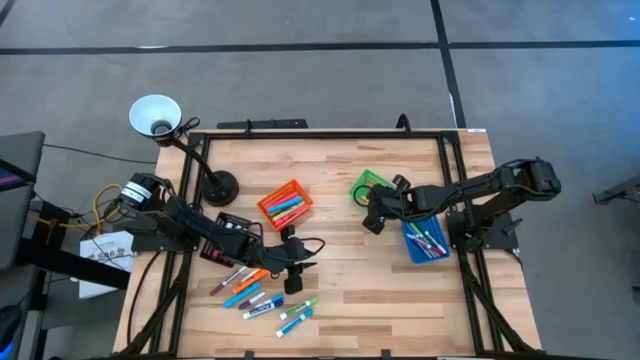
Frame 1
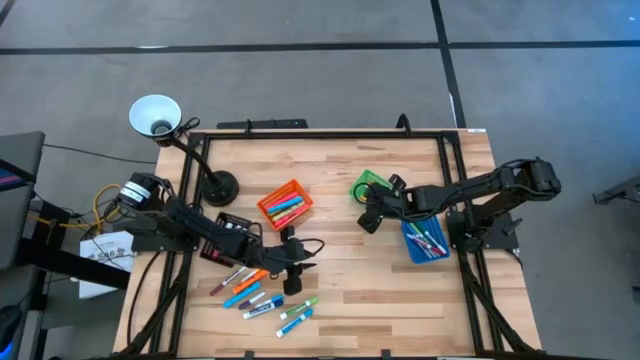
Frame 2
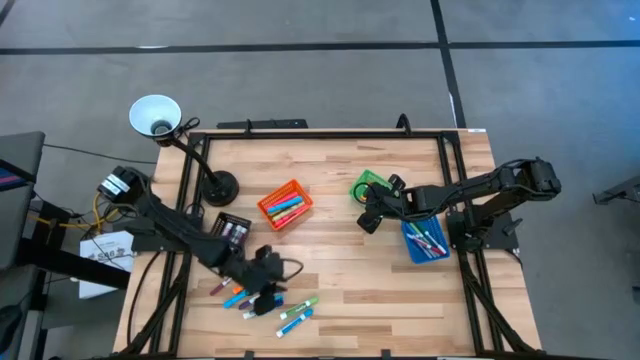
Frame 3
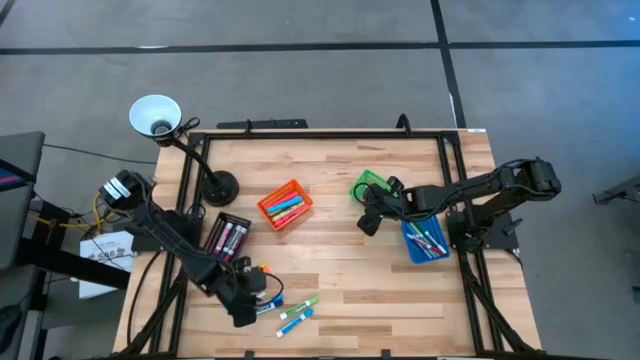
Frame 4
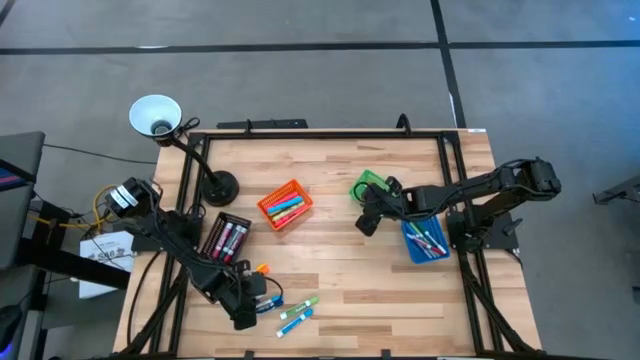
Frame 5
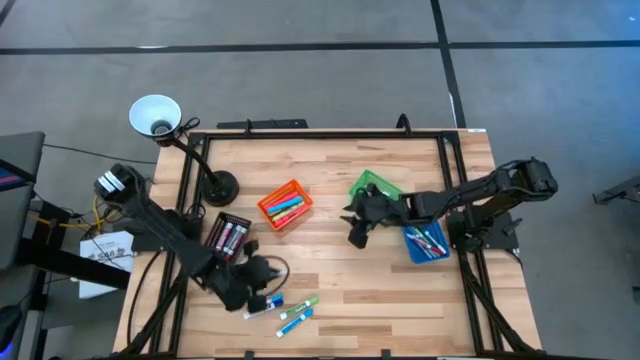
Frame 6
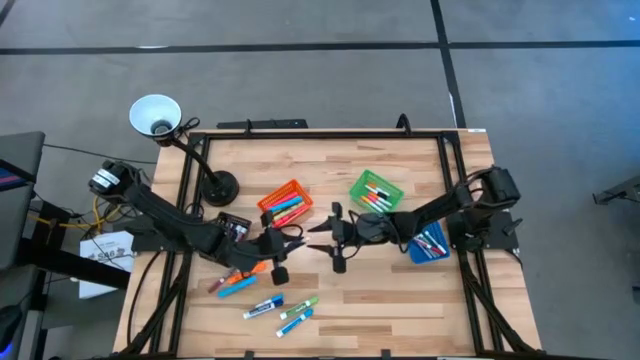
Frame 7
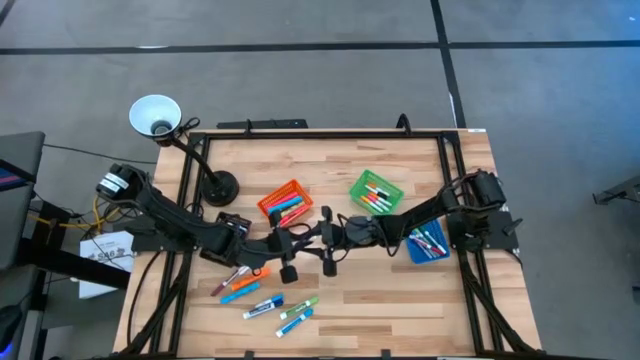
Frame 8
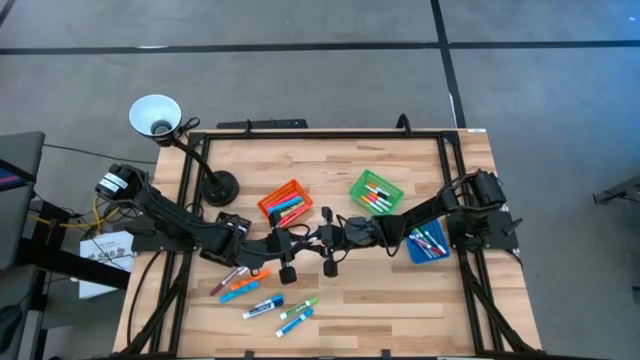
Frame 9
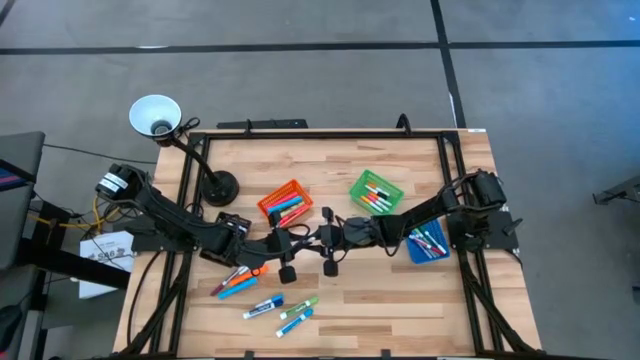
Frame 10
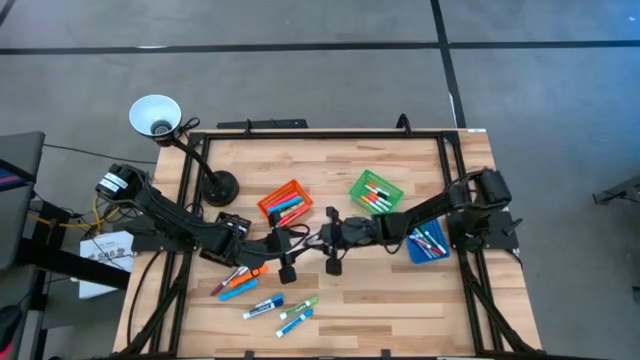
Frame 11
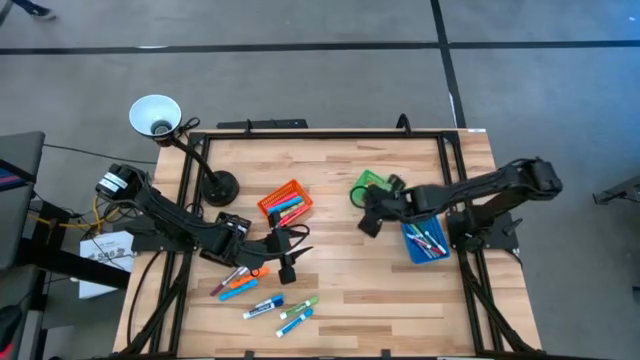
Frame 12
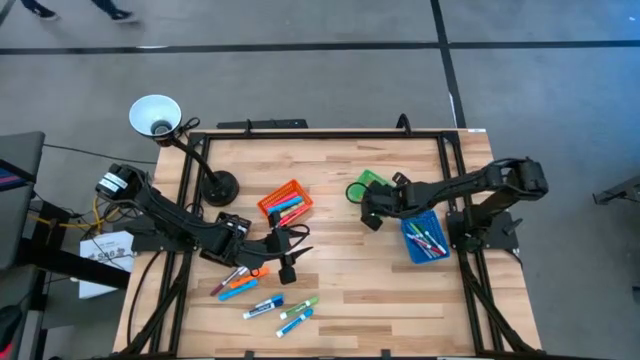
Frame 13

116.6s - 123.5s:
Task: Pick & Place Markers
Put the violet pen into the green bin

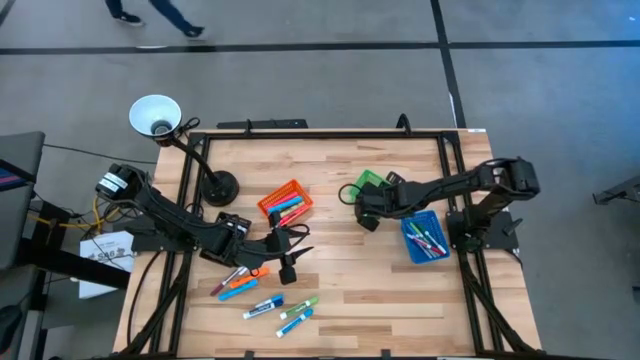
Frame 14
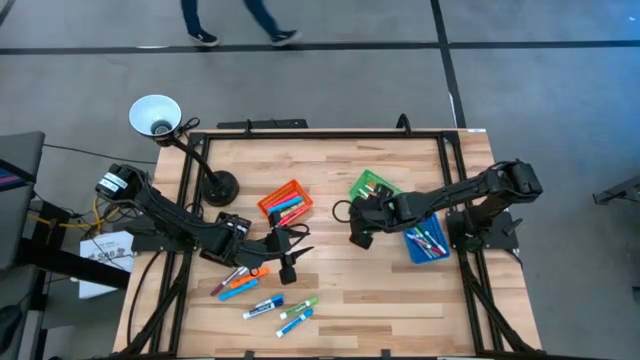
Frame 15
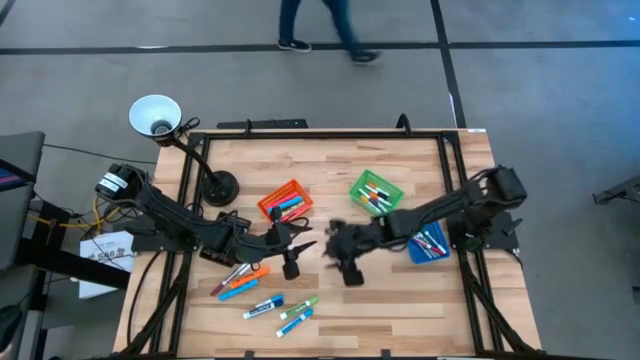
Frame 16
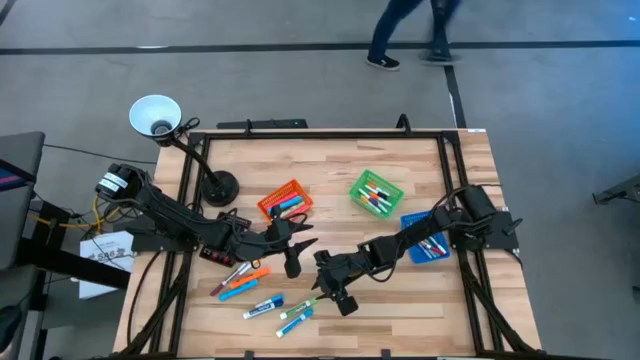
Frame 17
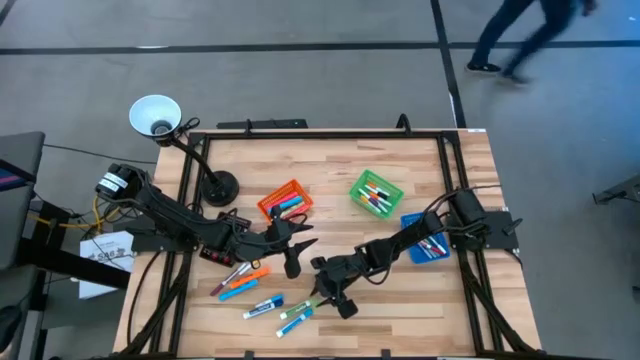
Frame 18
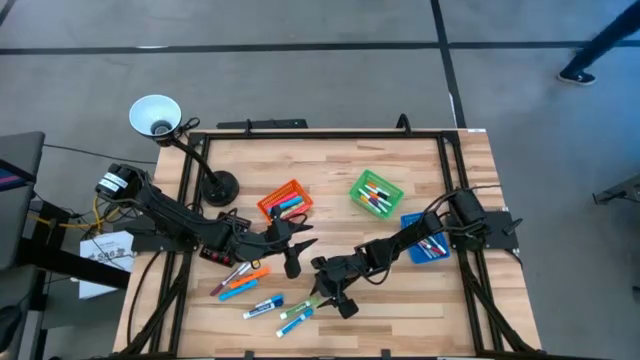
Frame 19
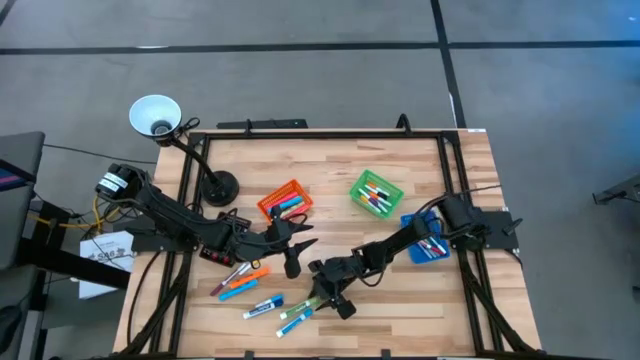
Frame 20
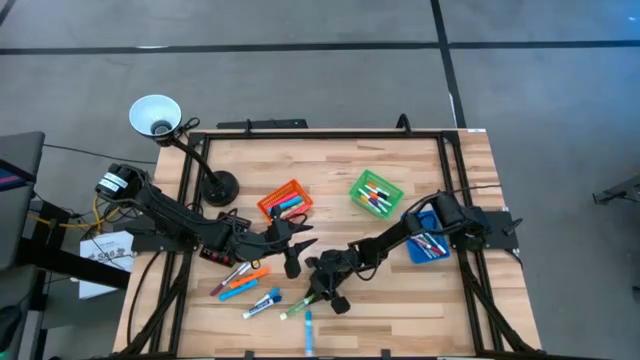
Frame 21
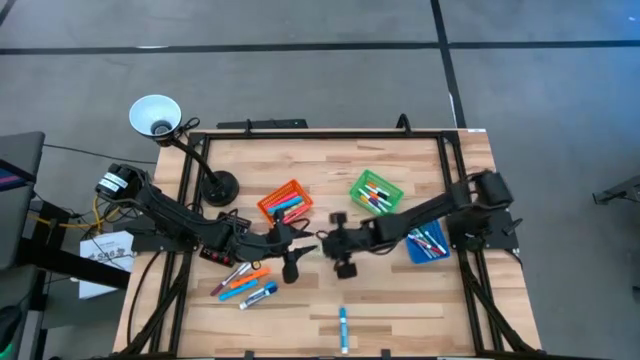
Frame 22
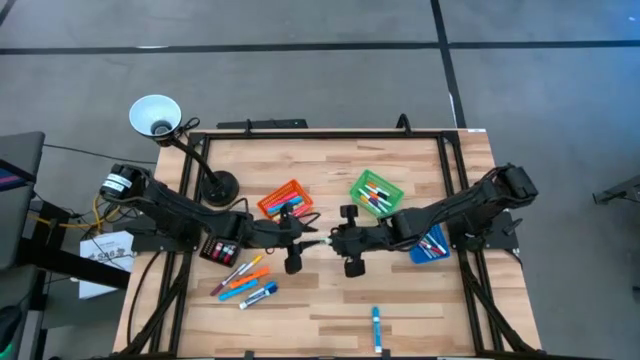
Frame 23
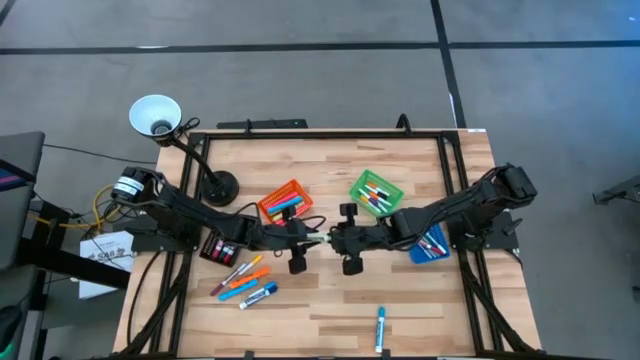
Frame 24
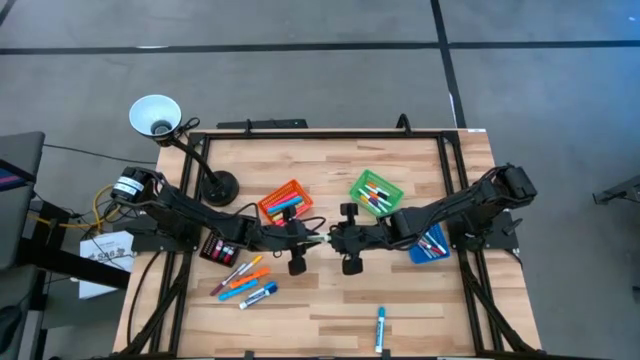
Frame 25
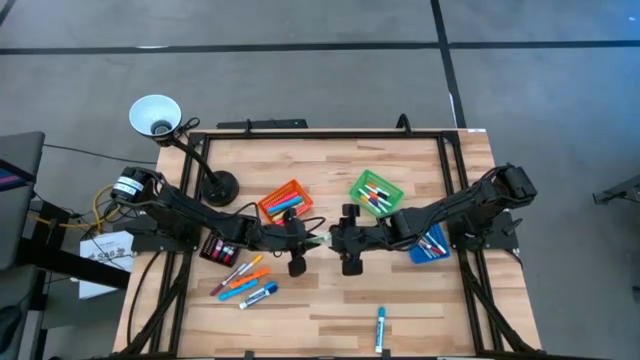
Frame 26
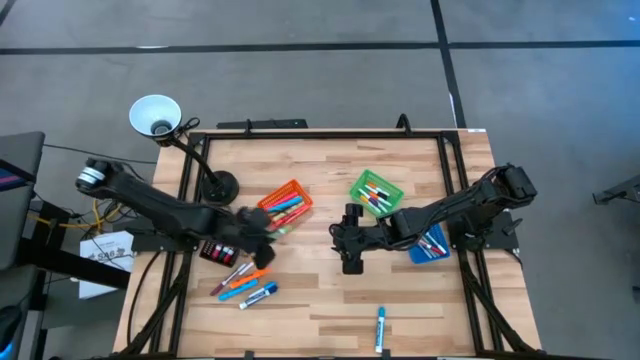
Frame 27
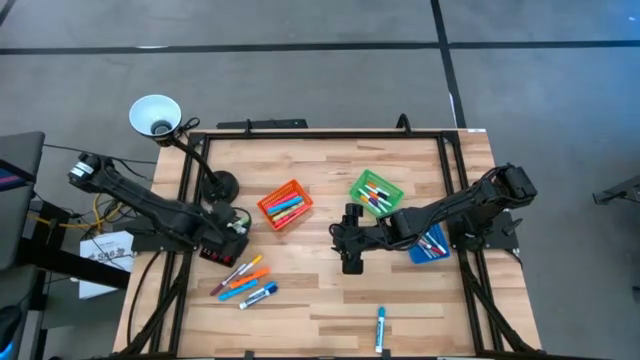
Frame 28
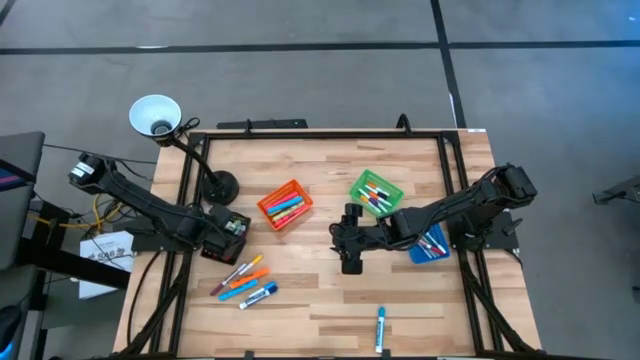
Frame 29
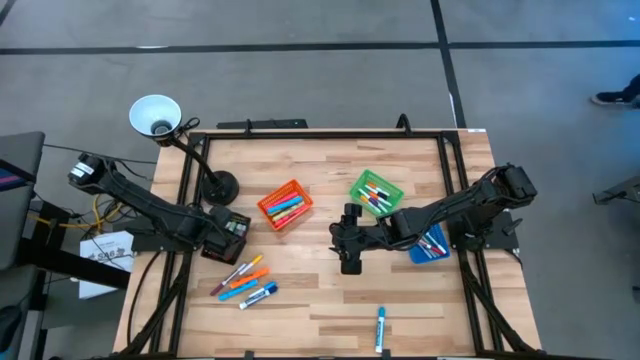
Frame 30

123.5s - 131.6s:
Put the green marker pen into the black bin

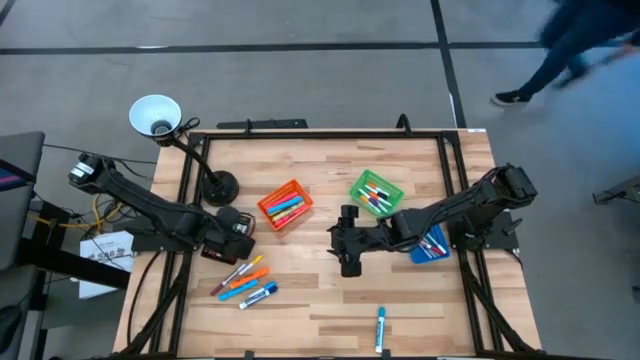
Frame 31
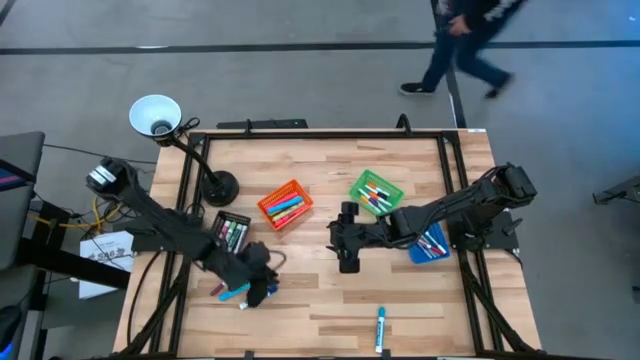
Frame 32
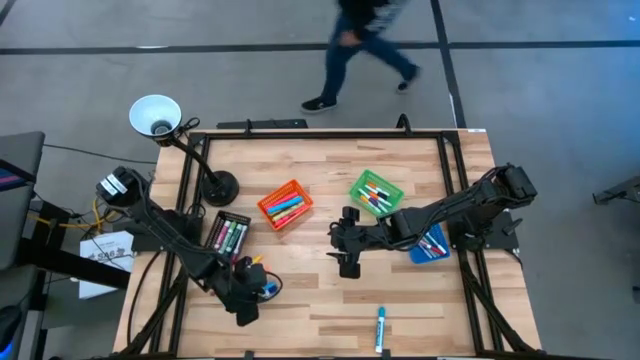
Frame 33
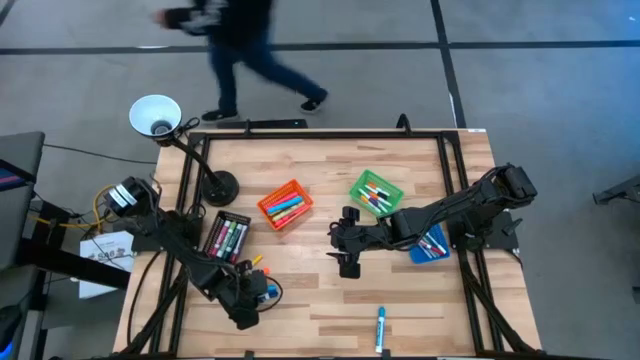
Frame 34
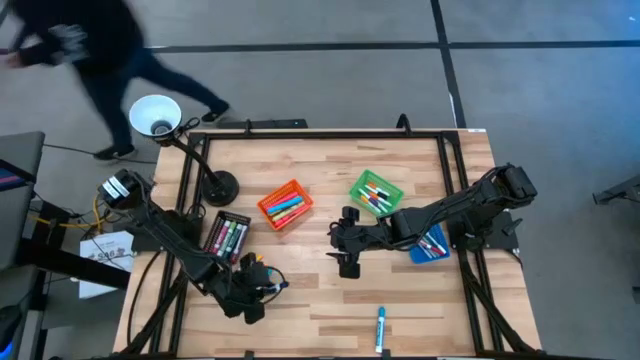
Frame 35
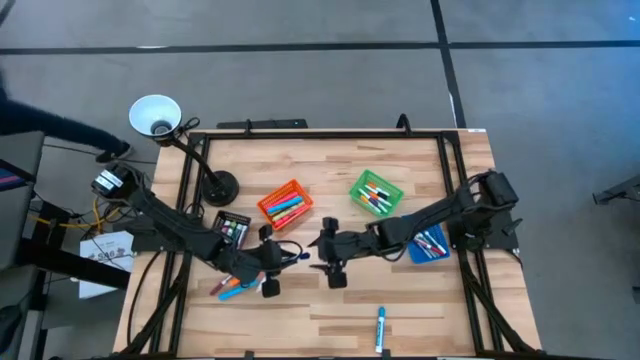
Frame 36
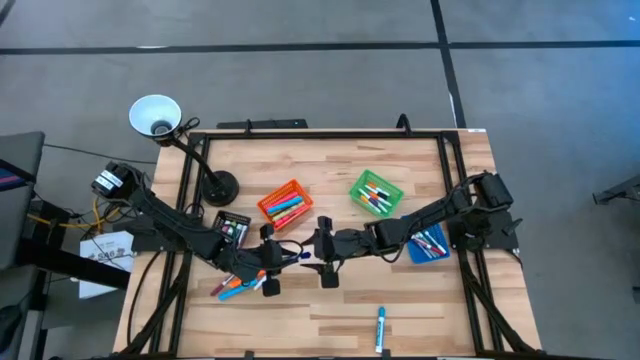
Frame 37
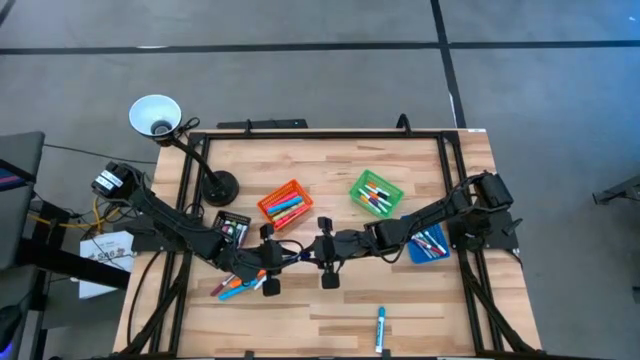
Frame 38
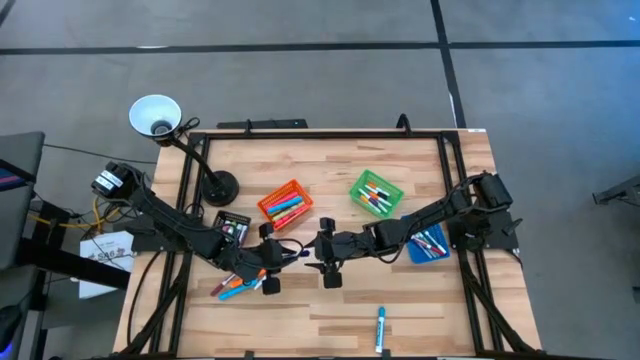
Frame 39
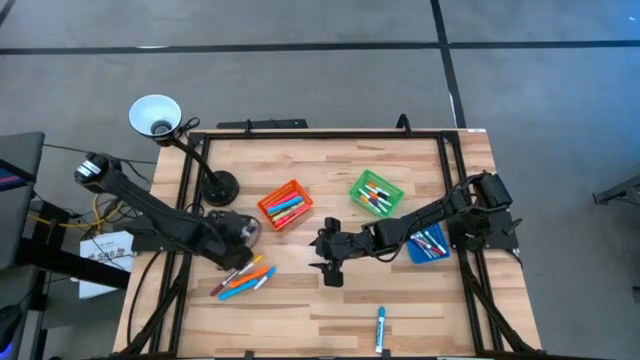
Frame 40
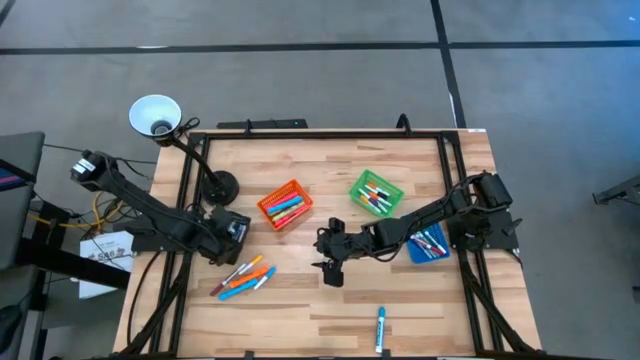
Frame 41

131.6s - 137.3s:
Put the dark blue marker pen into the black bin
